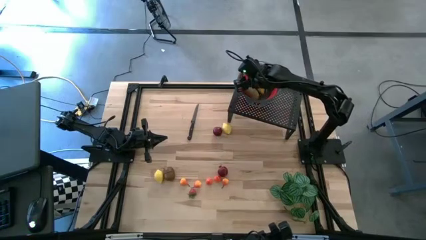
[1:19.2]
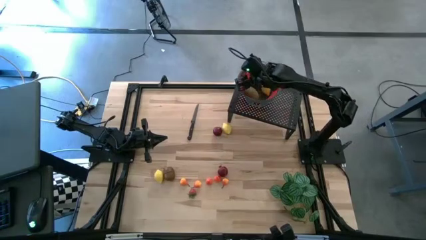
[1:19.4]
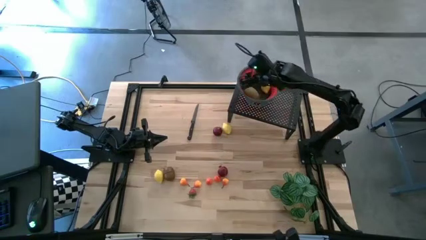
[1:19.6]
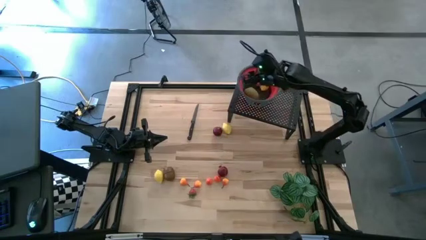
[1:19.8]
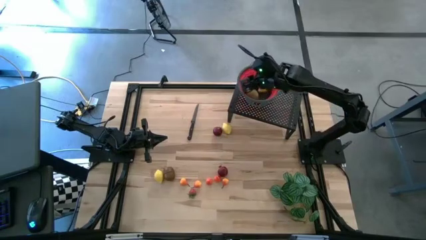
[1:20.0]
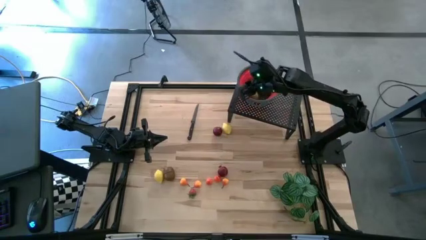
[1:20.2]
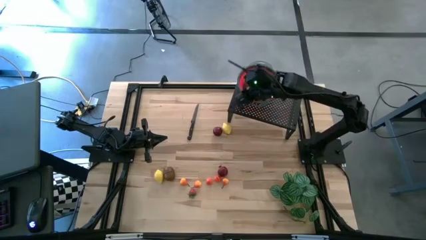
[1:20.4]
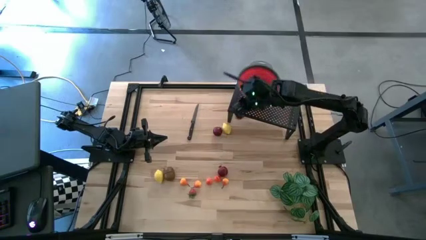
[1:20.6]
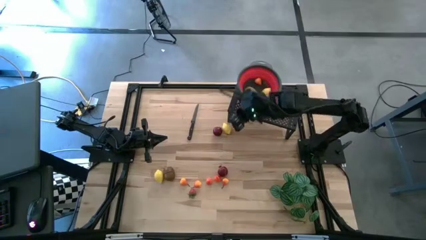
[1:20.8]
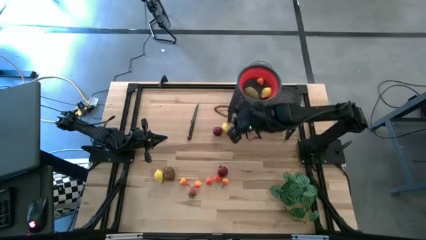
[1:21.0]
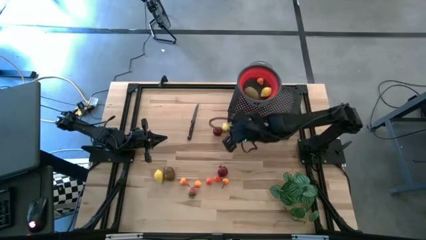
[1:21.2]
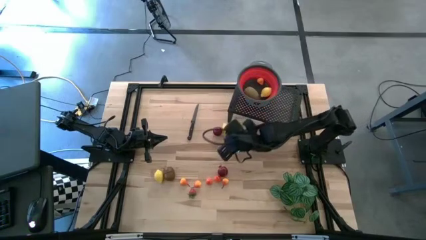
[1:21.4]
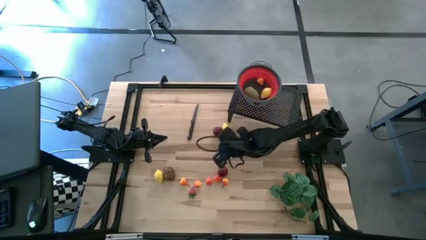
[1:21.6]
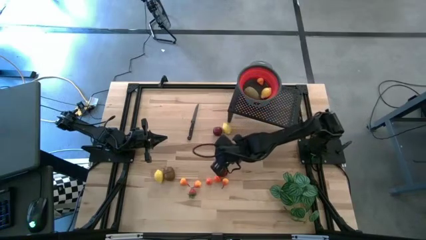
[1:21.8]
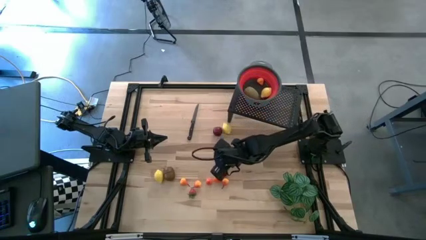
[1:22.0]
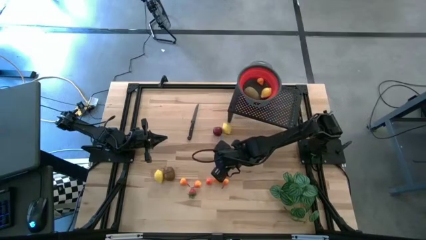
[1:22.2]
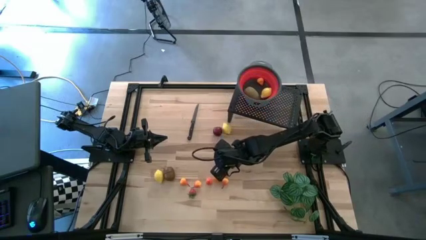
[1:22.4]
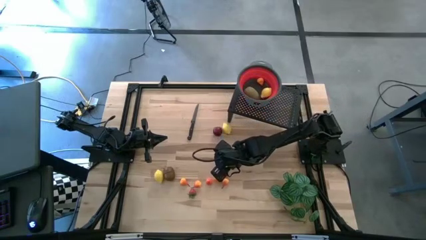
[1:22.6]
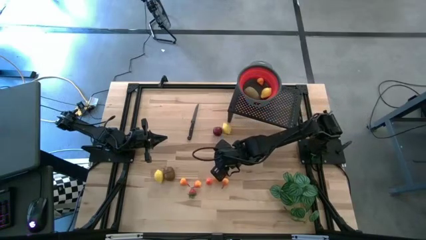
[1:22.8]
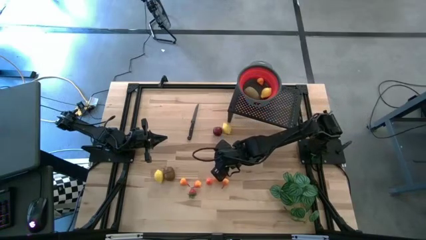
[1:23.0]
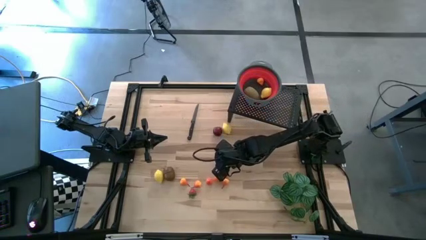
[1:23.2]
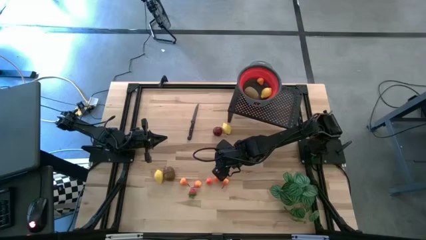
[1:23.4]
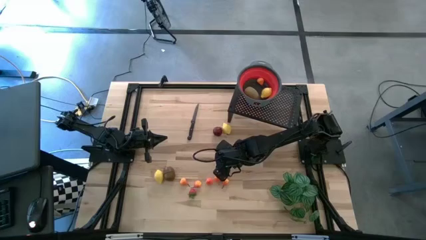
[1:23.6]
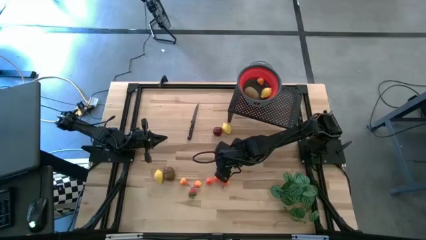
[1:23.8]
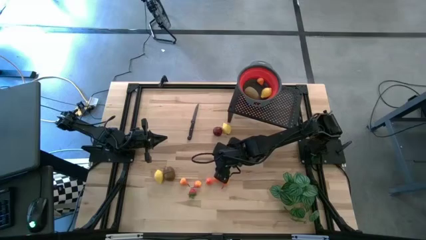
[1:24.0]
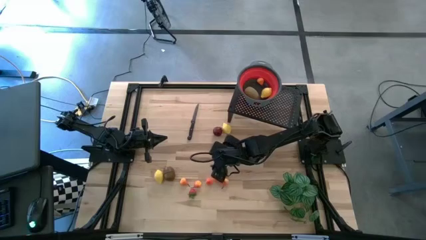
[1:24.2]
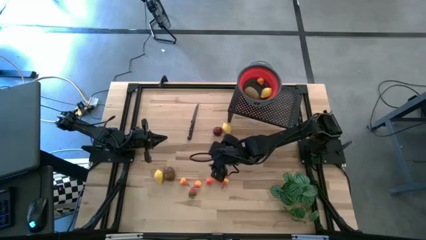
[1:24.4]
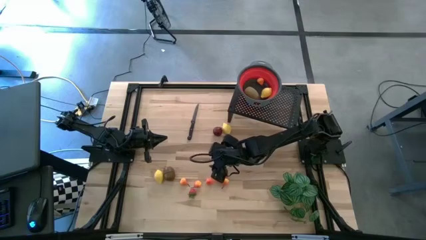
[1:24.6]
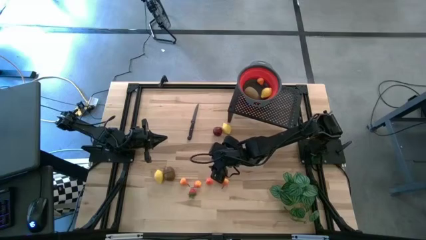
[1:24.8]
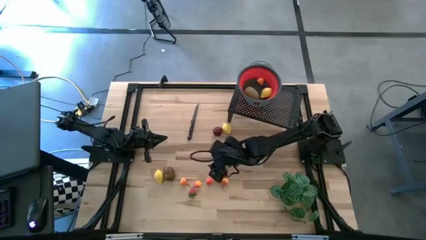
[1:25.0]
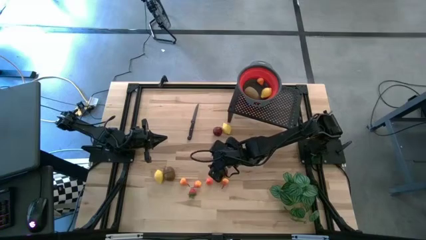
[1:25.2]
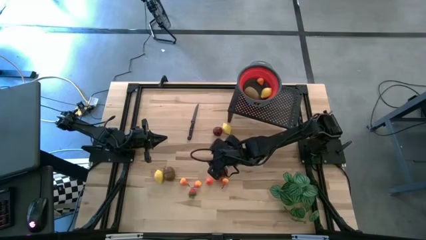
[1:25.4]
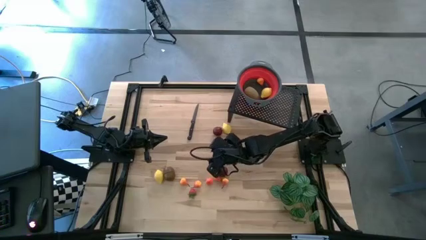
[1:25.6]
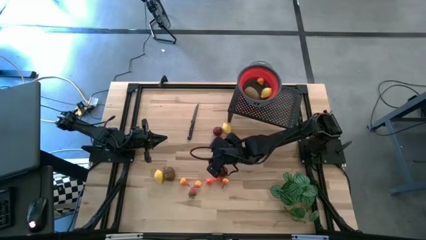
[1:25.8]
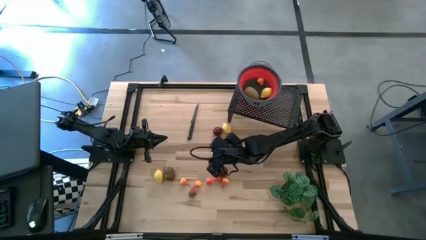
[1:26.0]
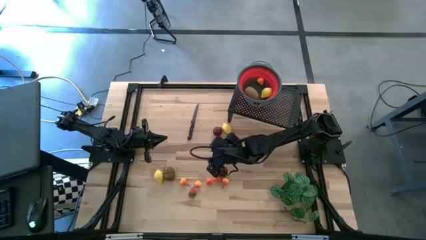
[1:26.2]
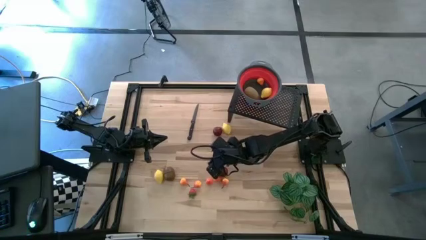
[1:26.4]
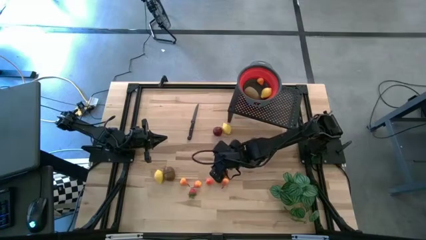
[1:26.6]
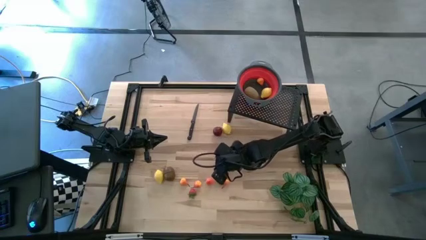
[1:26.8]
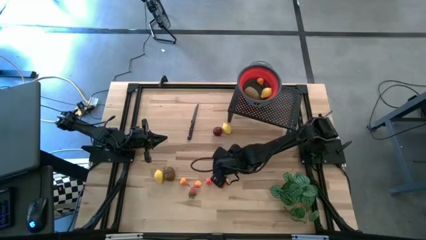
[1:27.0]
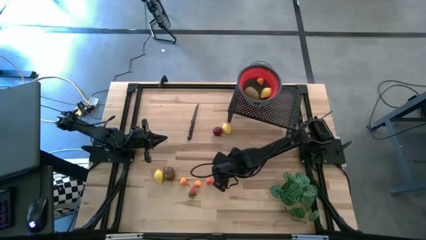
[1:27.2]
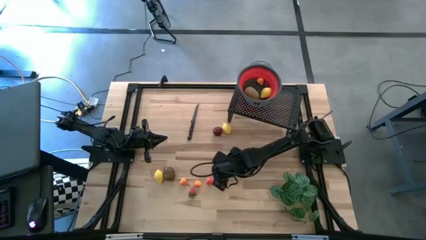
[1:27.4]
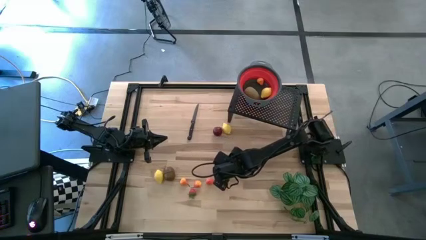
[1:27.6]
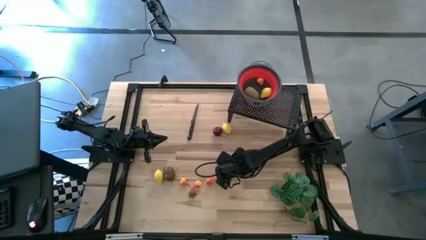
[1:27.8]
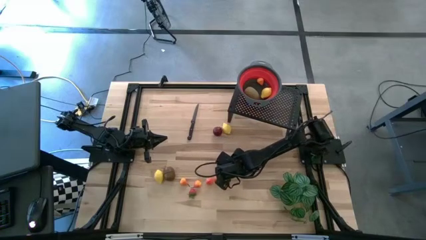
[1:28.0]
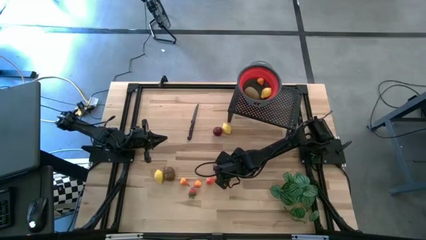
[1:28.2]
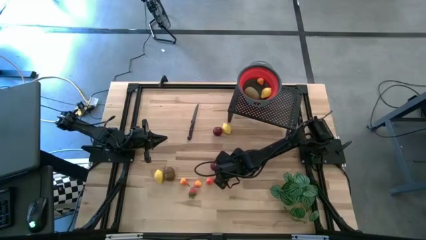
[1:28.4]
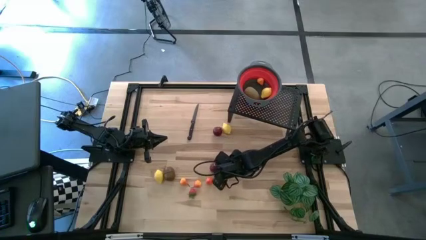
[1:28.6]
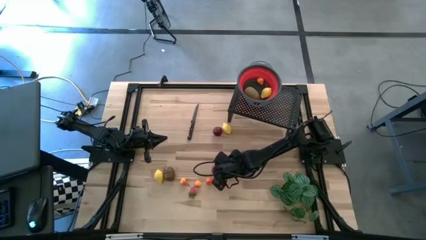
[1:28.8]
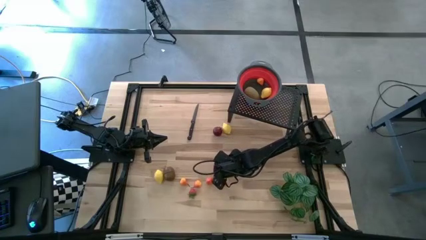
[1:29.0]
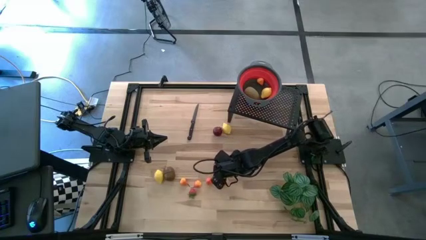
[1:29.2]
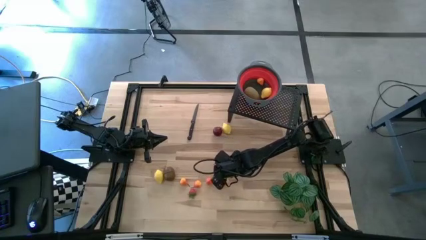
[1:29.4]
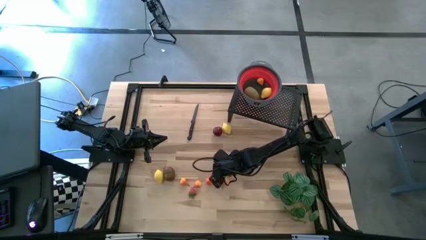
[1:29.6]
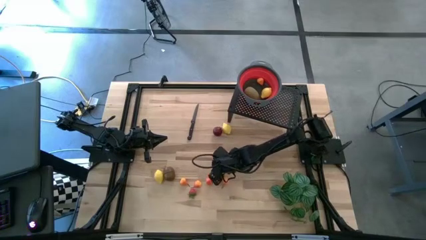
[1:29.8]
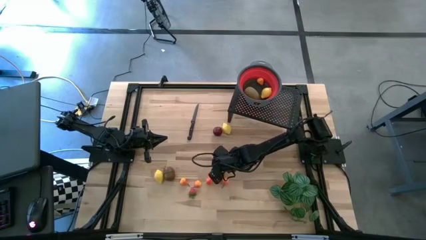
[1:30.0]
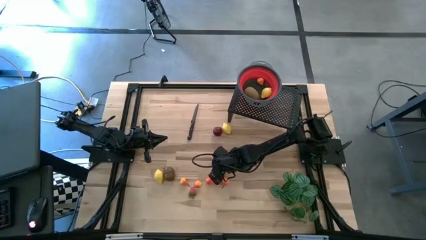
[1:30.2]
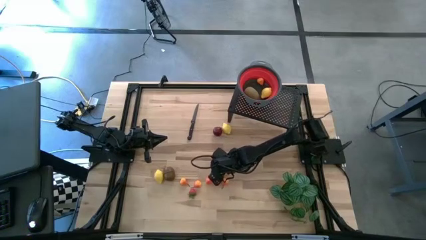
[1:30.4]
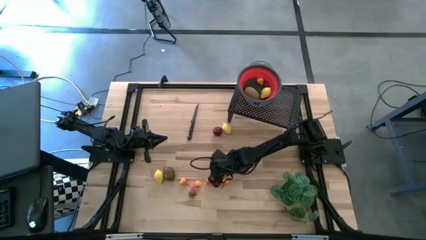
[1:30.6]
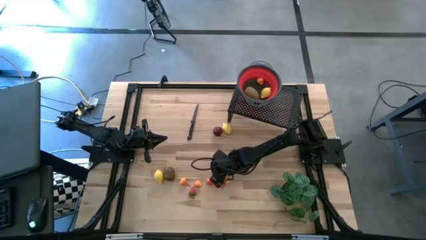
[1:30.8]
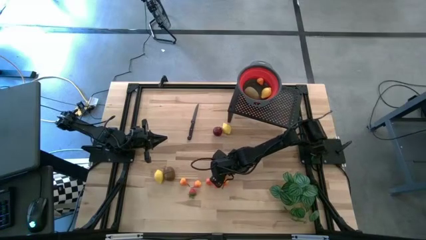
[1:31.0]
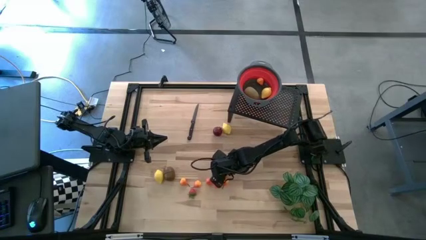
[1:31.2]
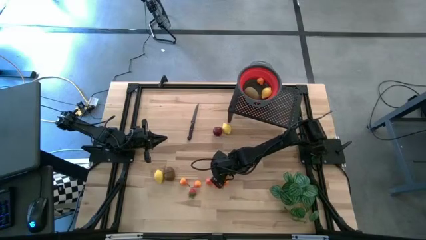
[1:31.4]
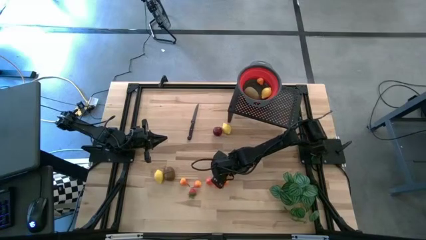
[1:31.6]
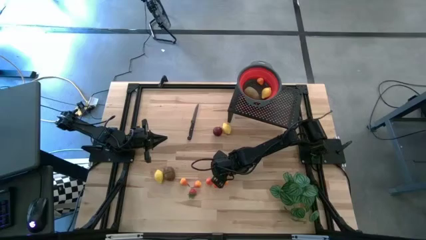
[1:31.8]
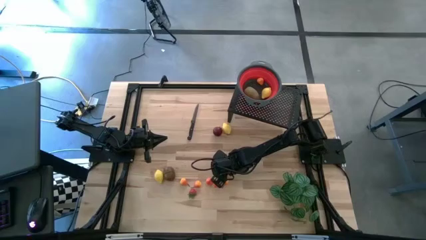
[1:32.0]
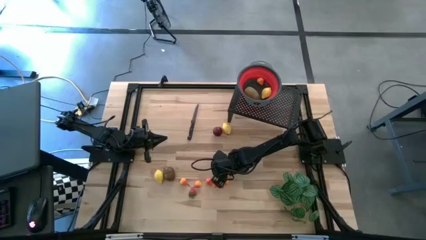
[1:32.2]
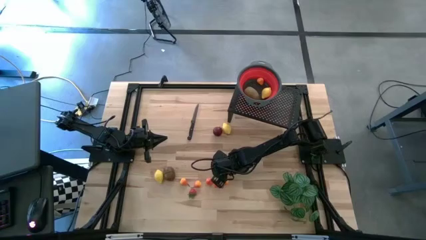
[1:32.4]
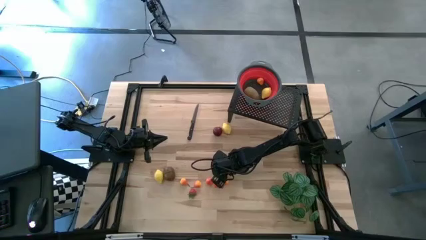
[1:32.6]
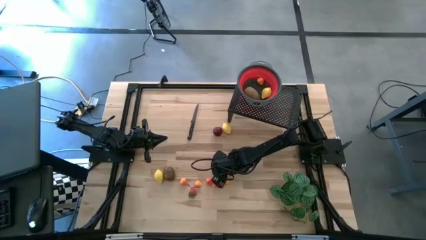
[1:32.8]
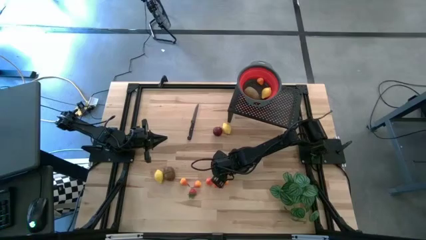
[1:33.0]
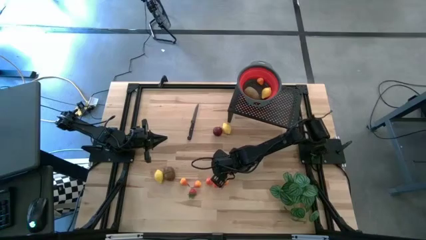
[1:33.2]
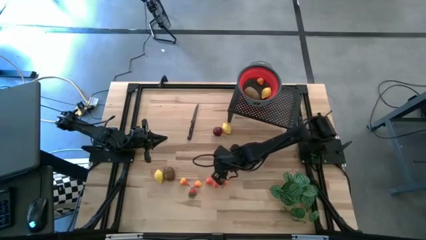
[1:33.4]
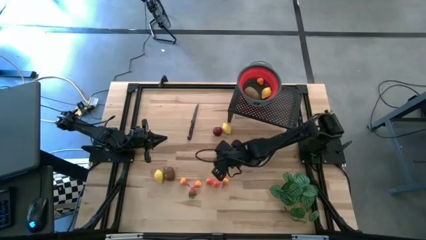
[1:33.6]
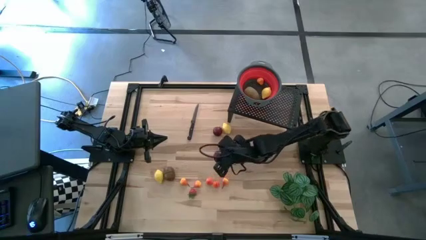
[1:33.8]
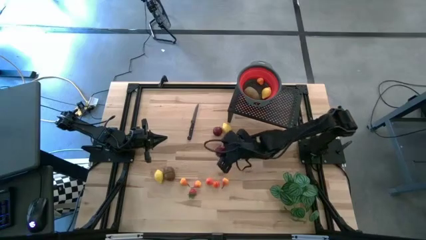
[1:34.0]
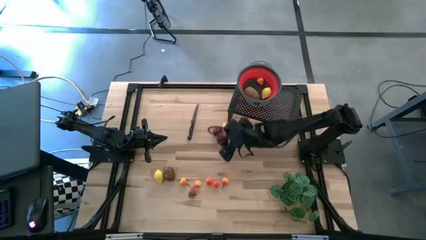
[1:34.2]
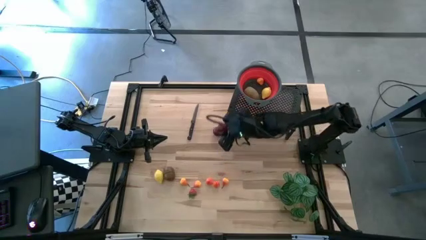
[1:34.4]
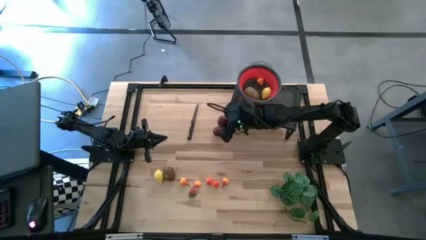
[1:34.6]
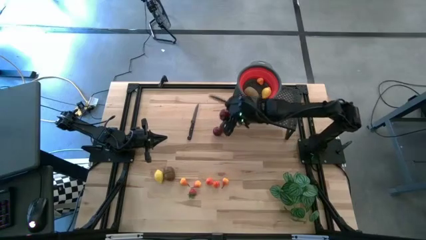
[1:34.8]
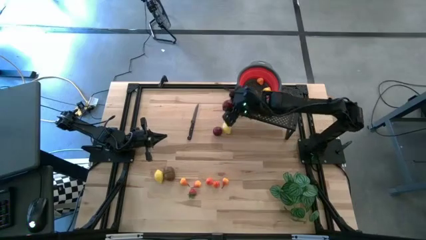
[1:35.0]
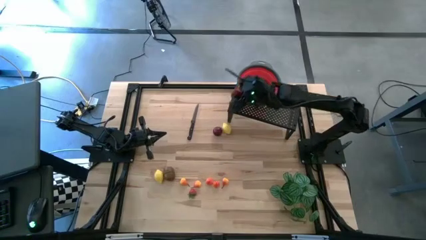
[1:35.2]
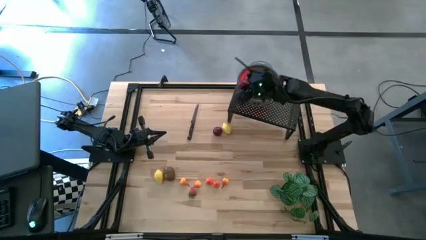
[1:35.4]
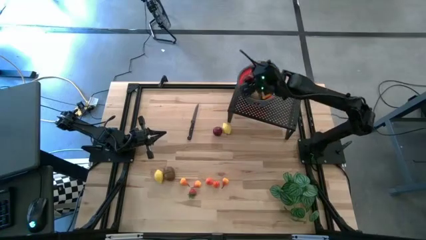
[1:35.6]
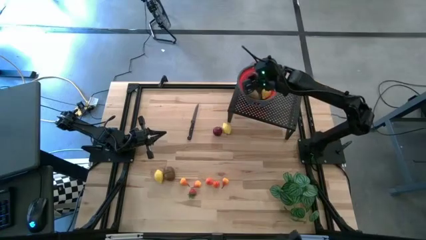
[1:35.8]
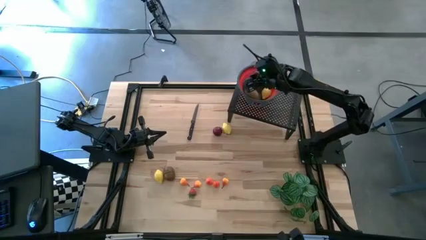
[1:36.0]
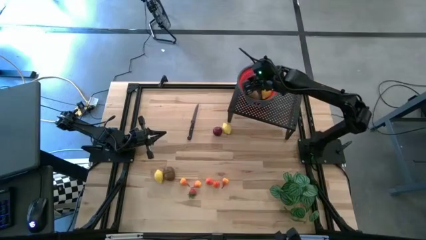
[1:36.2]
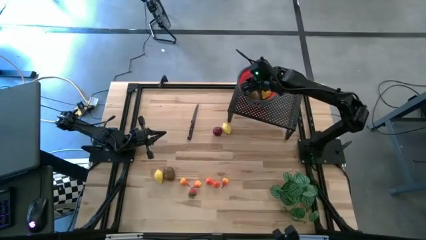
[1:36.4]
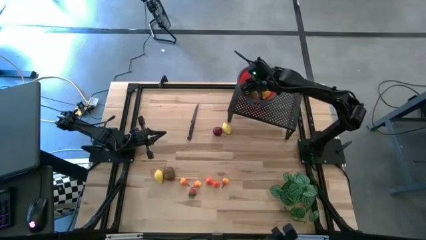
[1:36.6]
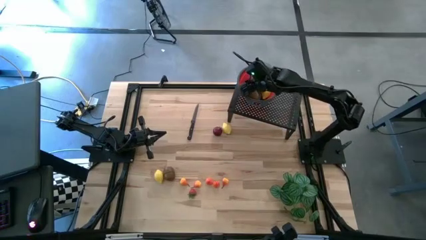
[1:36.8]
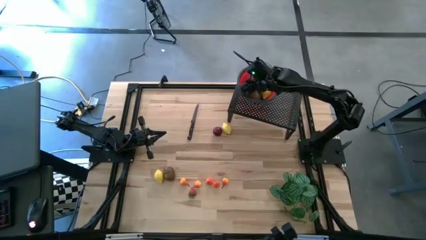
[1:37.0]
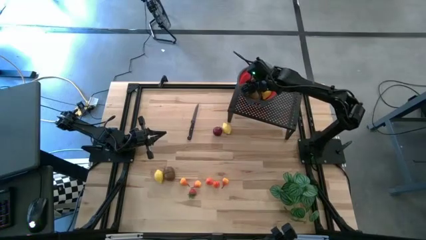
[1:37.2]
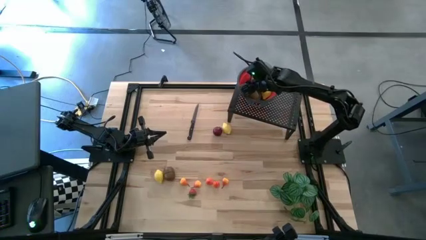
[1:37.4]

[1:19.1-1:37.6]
Task: Pick & Place Fruit
Put the red pomegranate into the red strainer bowl on the shelf
